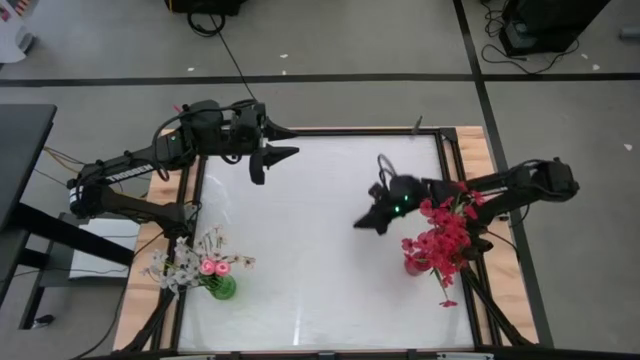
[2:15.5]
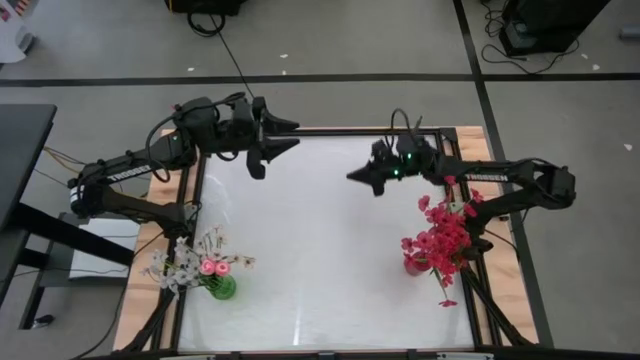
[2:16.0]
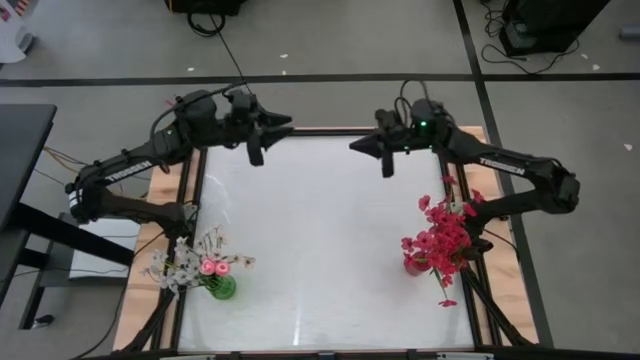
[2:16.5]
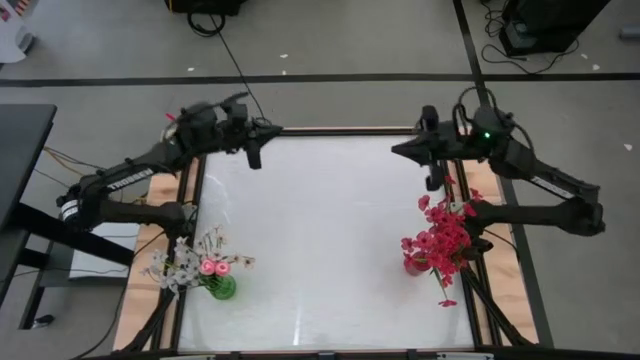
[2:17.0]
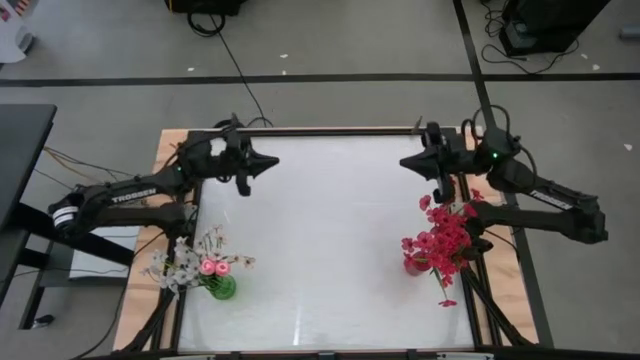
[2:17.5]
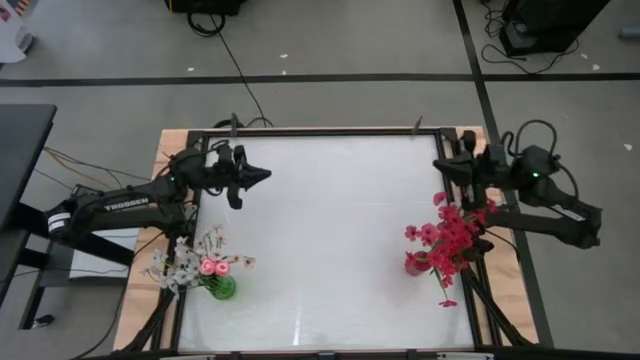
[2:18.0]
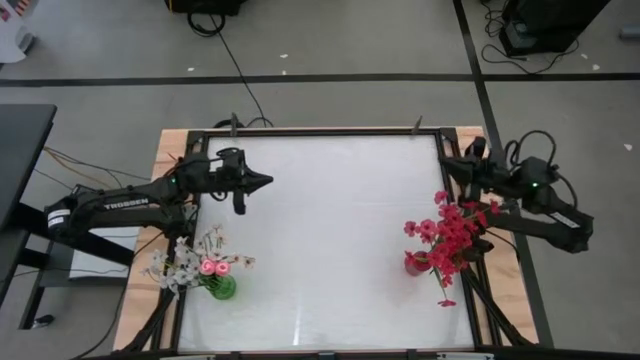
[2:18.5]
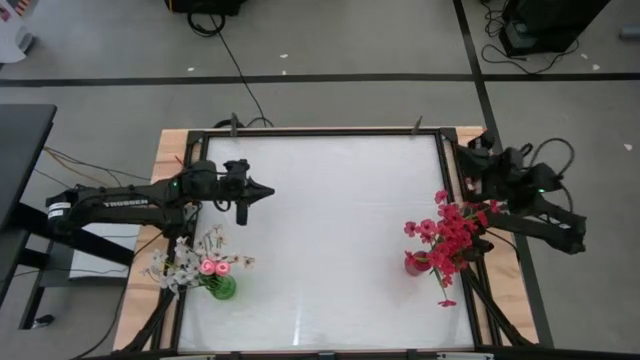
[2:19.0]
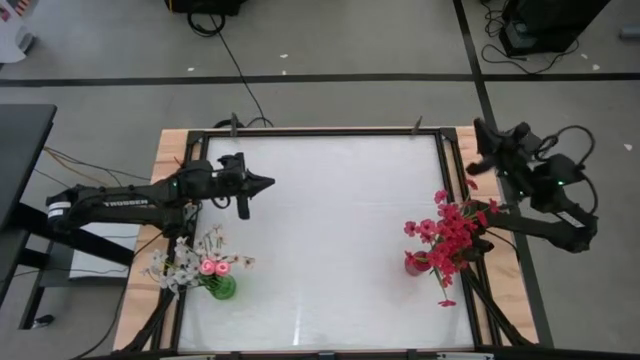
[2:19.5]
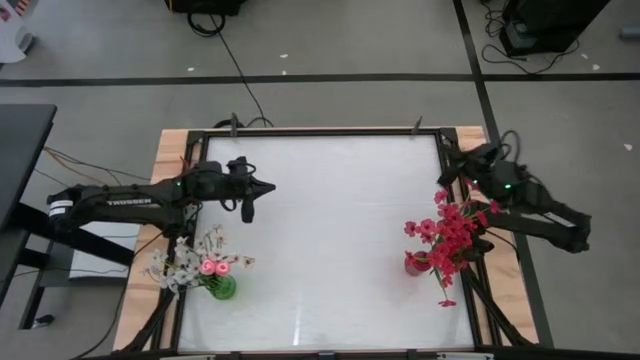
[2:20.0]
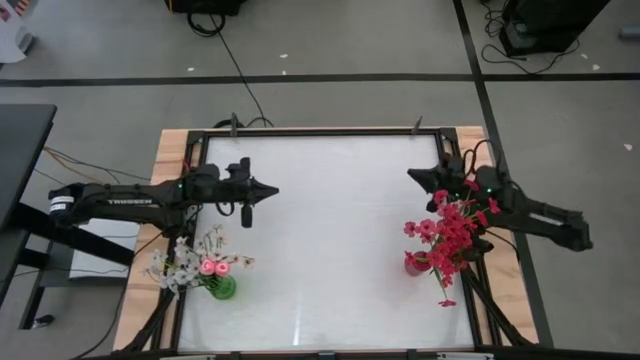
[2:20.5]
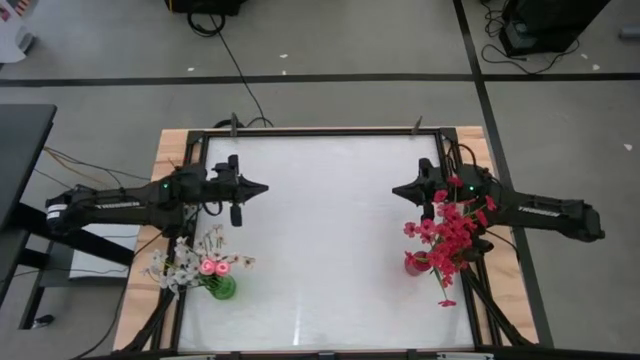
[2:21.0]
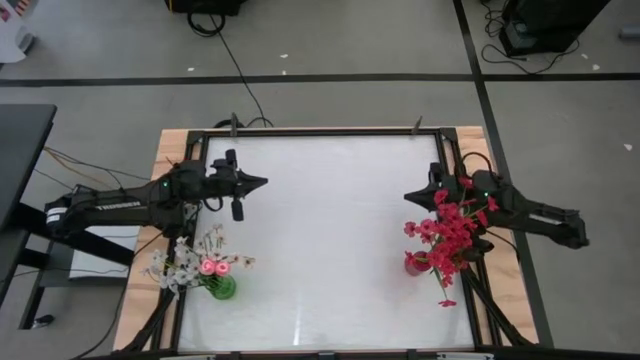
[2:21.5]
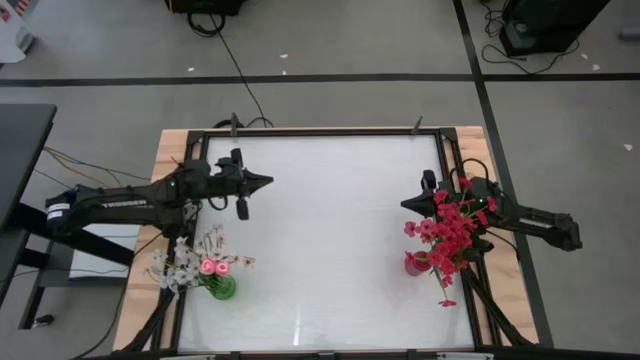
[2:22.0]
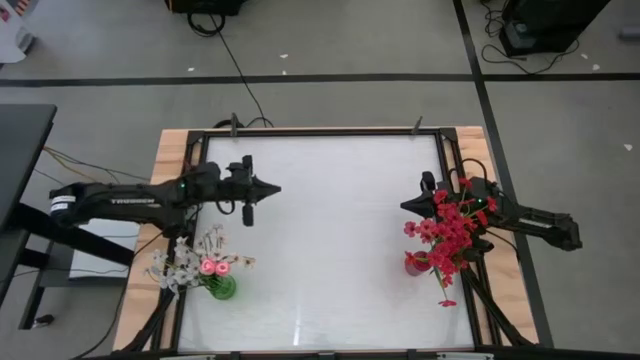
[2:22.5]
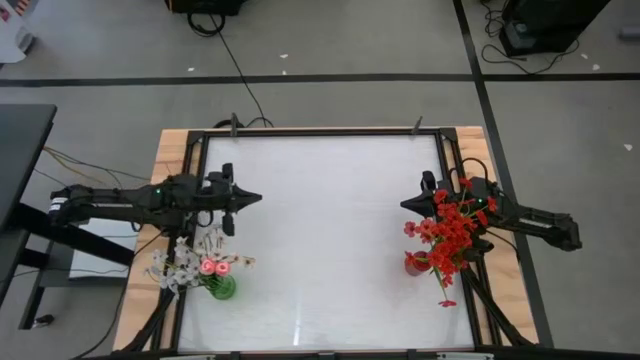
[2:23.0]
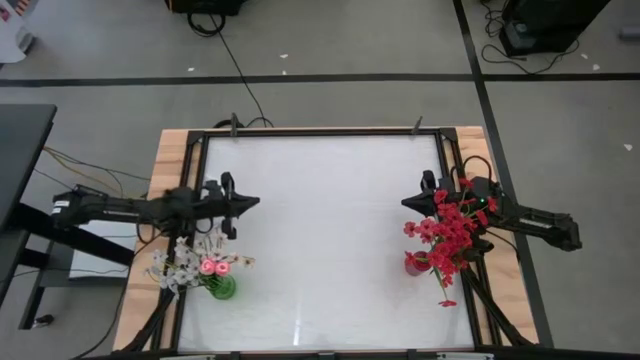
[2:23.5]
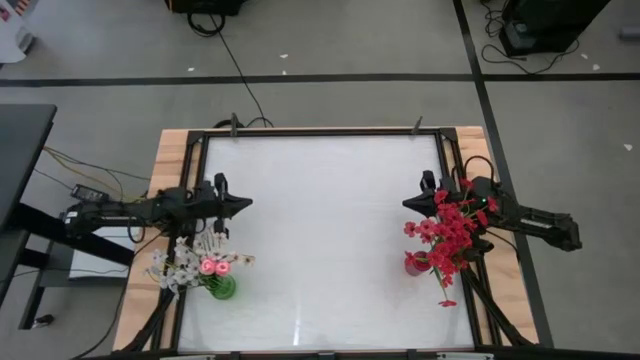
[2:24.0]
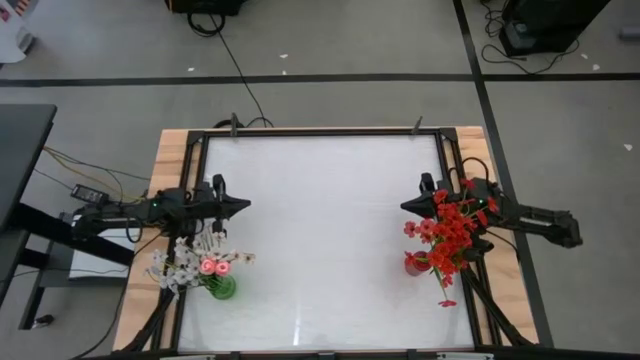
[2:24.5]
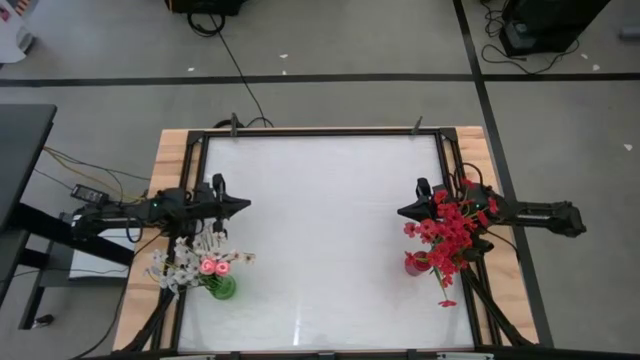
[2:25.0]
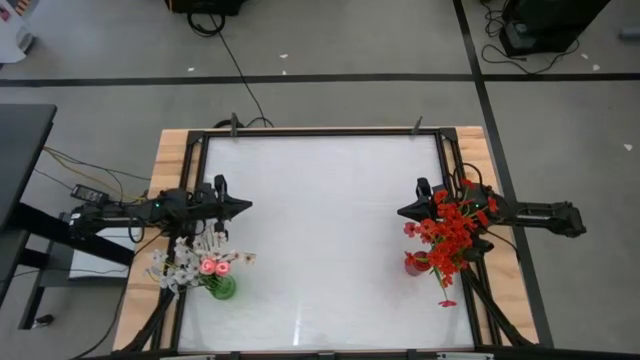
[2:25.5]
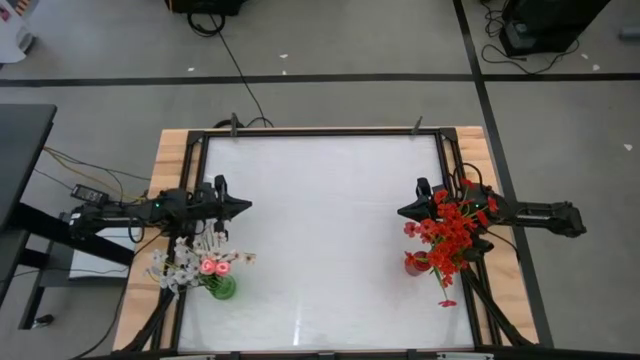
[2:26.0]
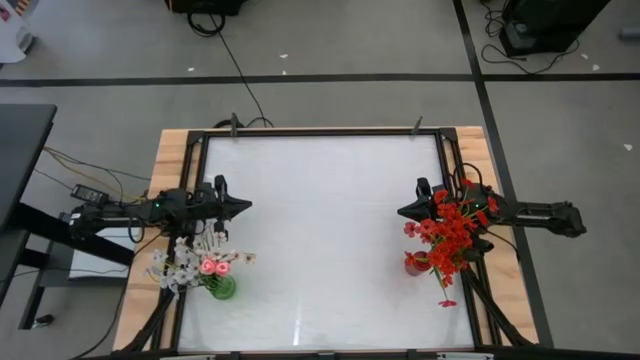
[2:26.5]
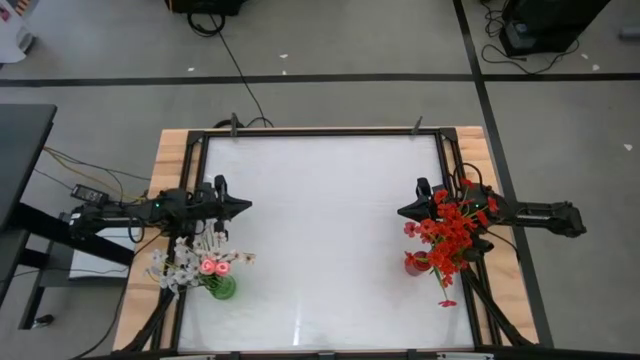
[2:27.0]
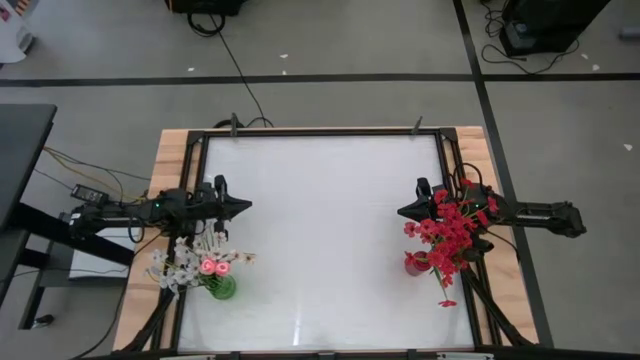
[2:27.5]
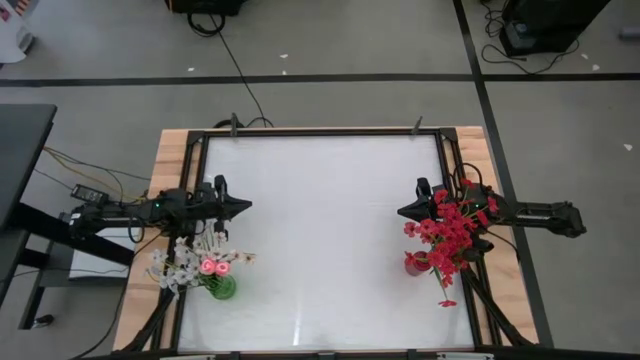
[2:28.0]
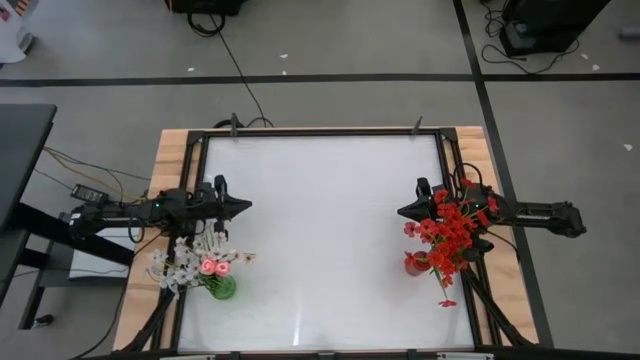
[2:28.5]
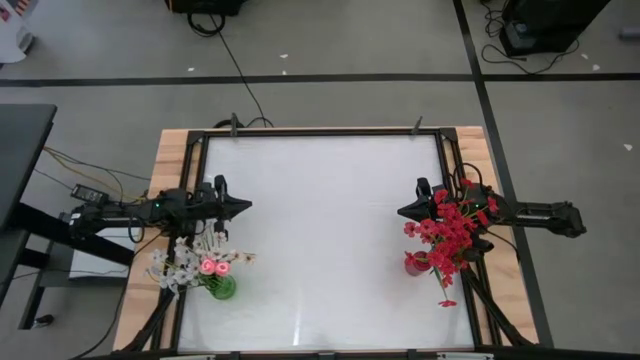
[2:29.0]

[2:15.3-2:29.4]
Task: Sort flowers into vase by color
Return to Home Position

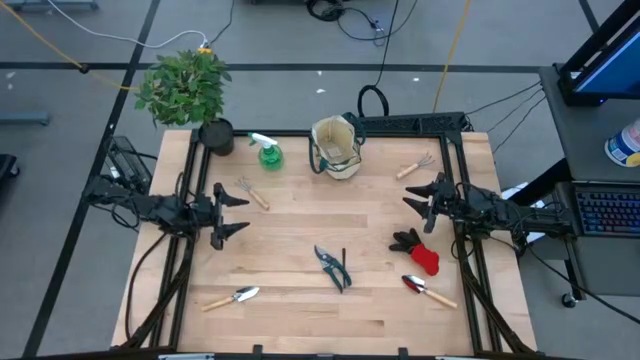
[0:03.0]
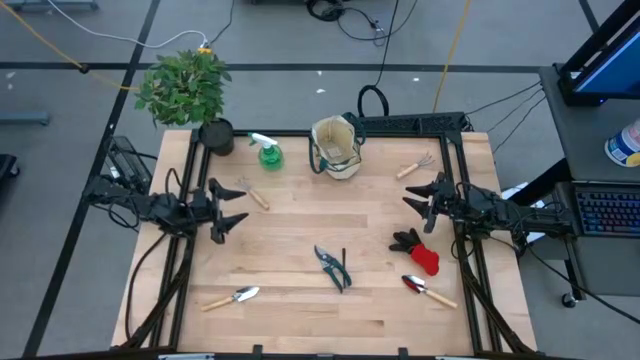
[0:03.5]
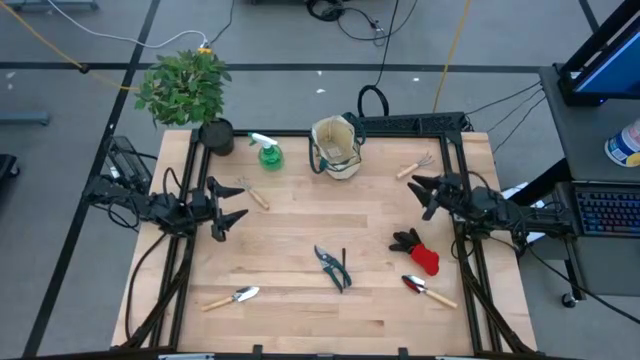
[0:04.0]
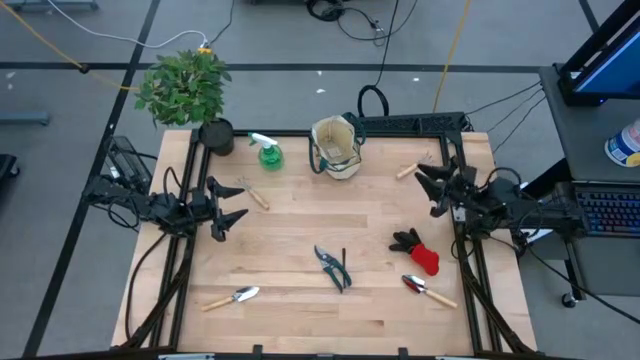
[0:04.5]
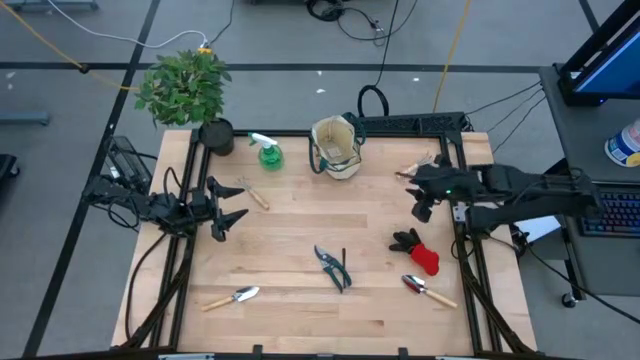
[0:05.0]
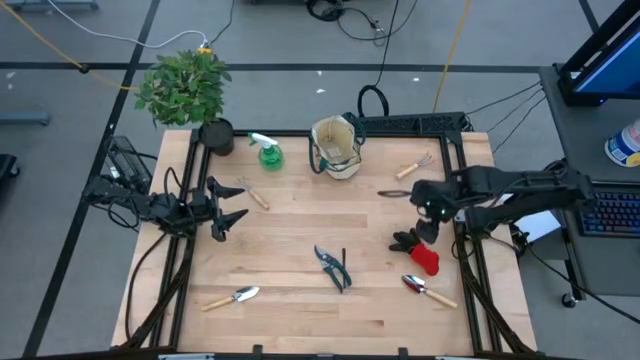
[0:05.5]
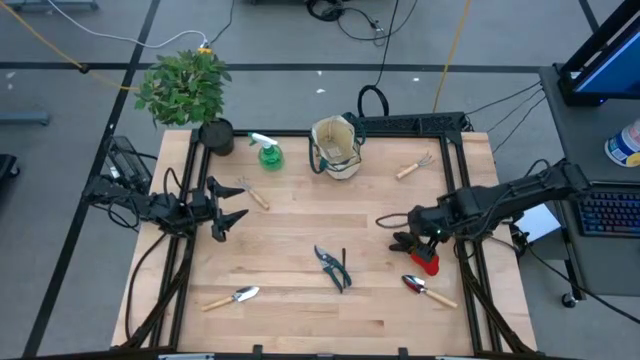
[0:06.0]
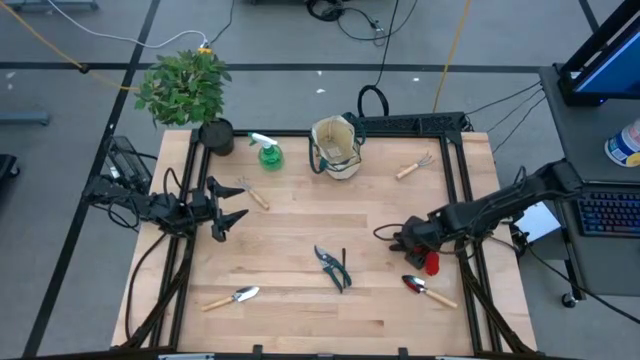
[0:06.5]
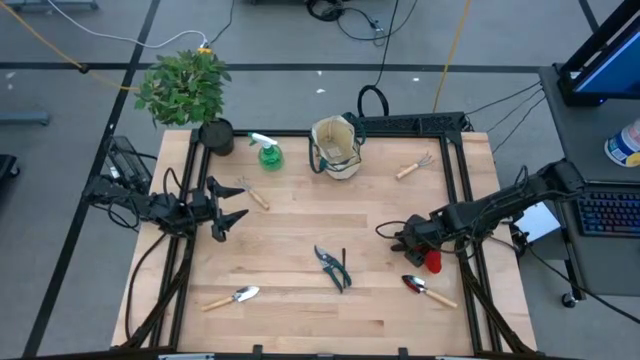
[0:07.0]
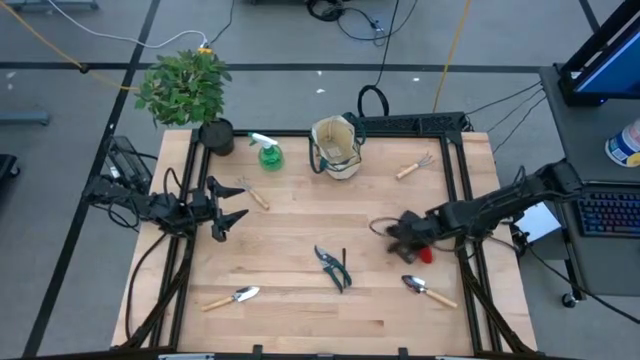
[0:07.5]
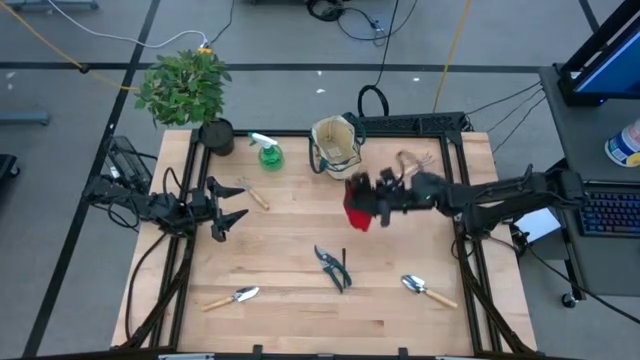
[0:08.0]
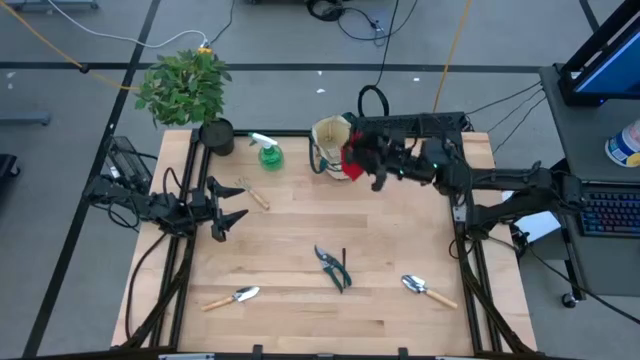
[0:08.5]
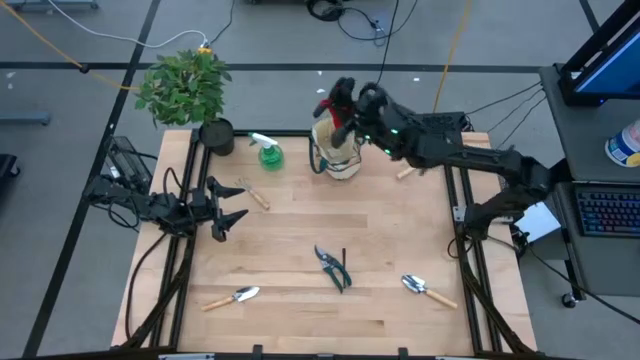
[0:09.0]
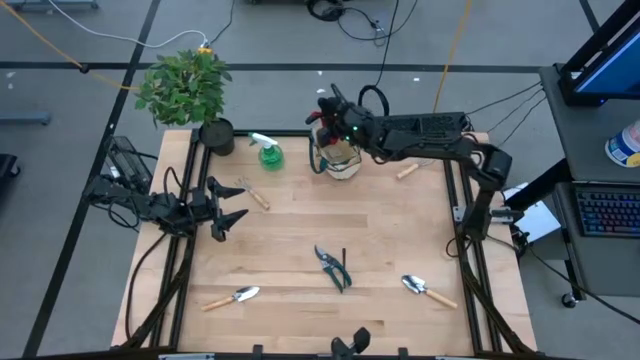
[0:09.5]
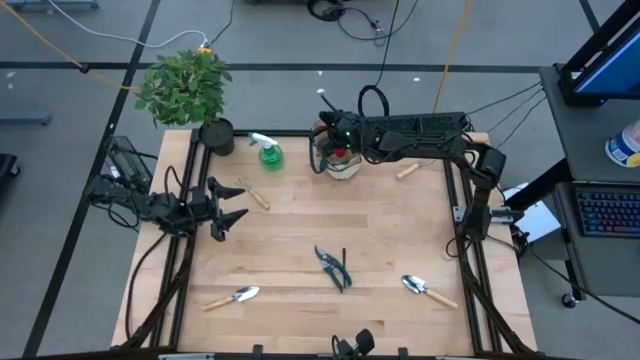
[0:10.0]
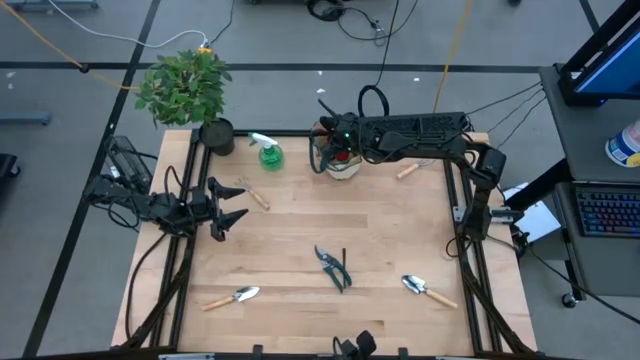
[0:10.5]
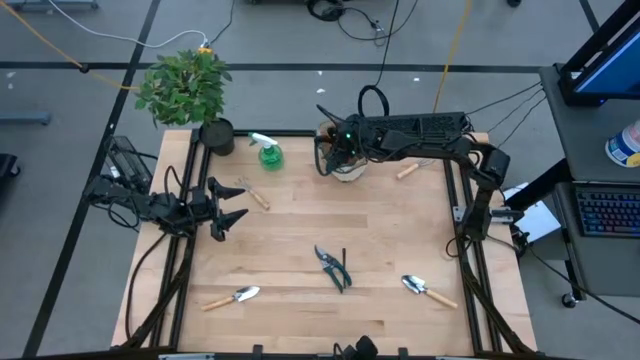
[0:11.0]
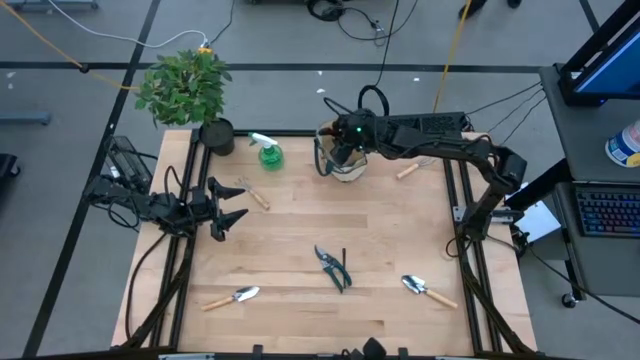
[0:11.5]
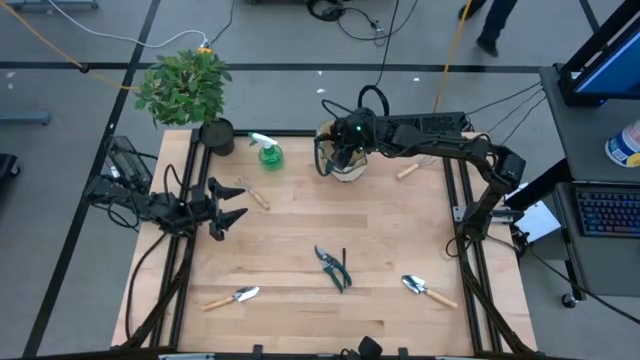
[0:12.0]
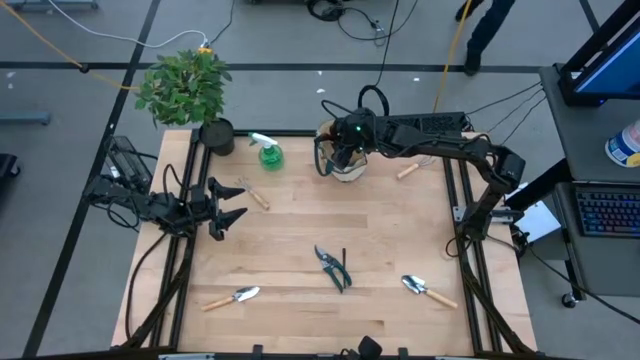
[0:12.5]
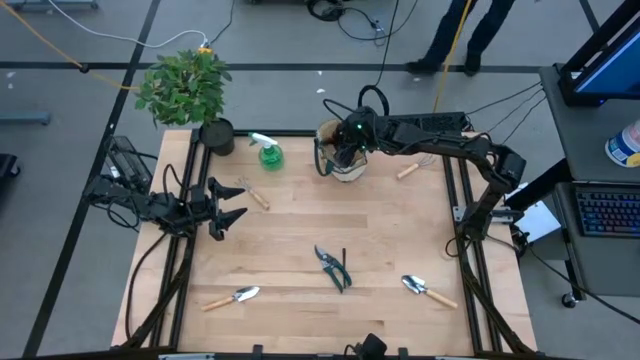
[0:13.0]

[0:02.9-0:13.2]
Task: Pick & Place Garden tools in Gardening bag
Put the gloves into the gardening bag
